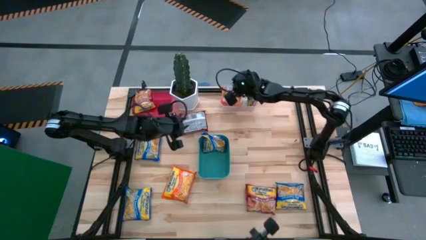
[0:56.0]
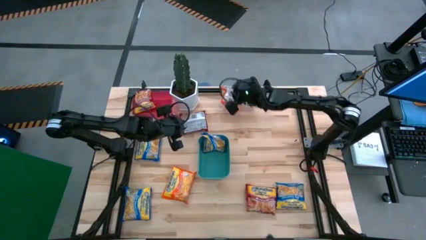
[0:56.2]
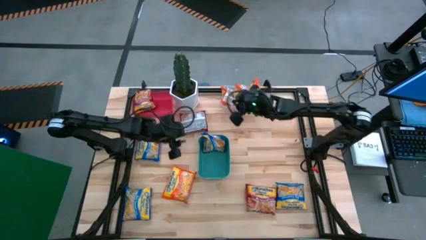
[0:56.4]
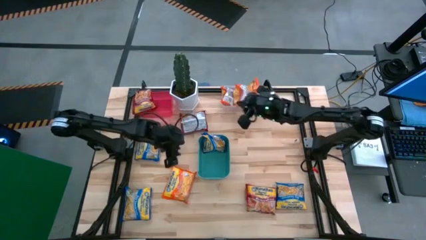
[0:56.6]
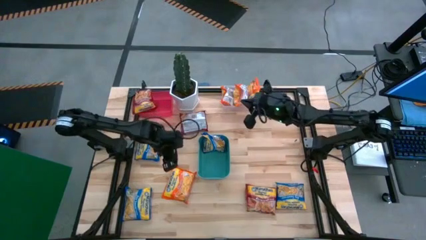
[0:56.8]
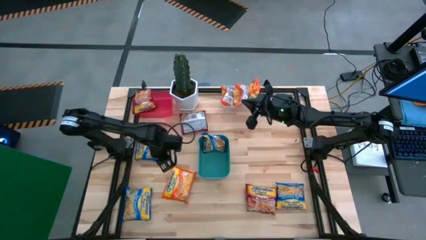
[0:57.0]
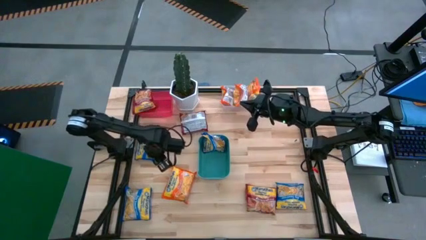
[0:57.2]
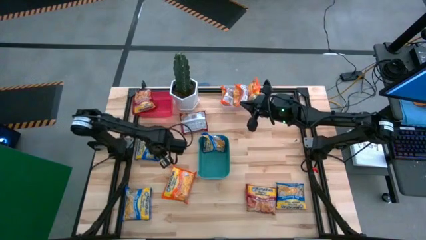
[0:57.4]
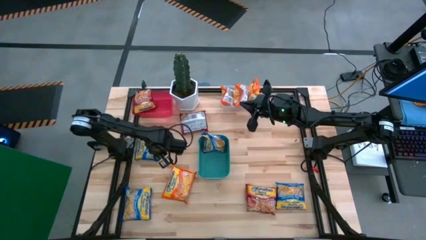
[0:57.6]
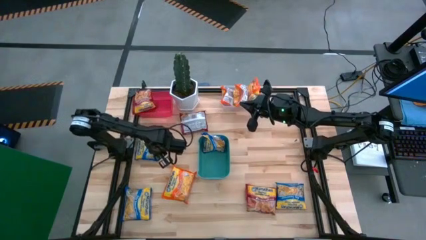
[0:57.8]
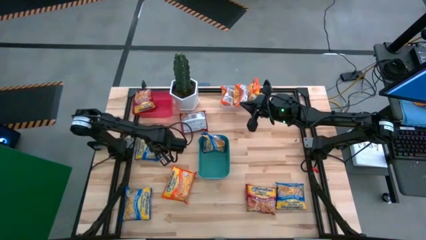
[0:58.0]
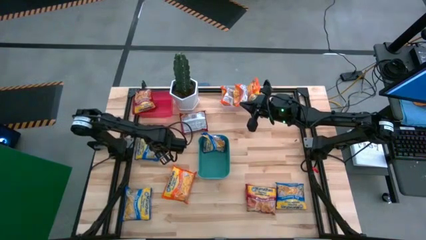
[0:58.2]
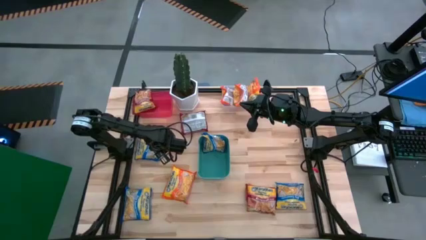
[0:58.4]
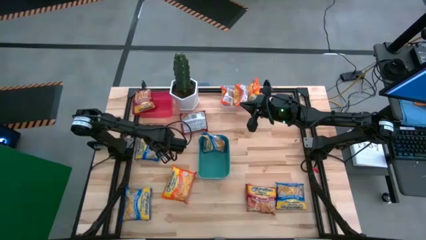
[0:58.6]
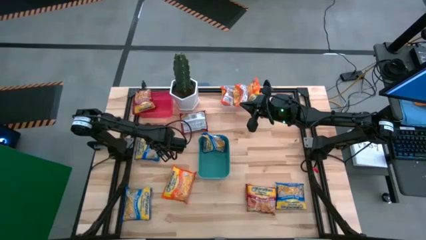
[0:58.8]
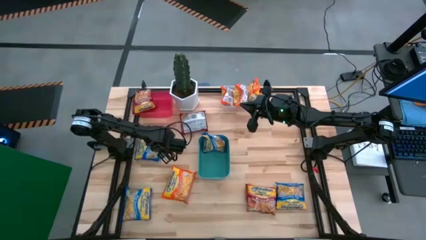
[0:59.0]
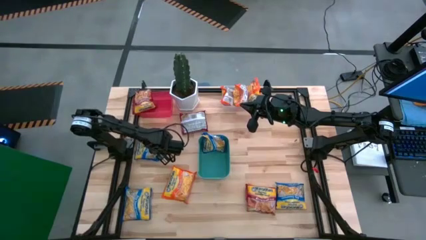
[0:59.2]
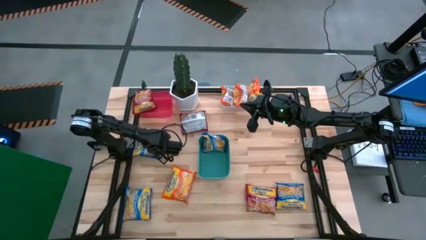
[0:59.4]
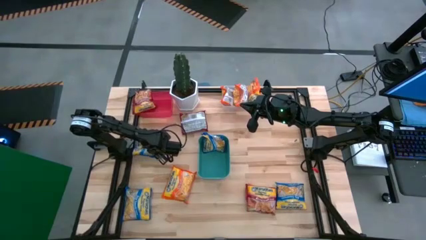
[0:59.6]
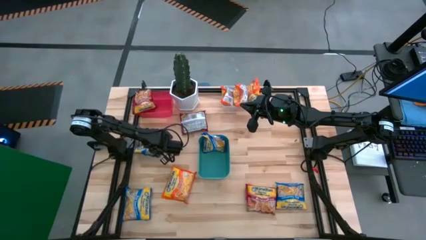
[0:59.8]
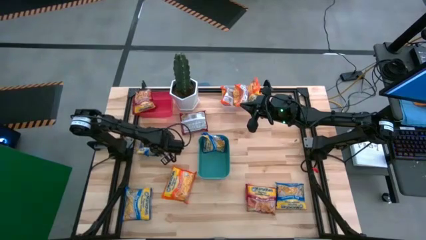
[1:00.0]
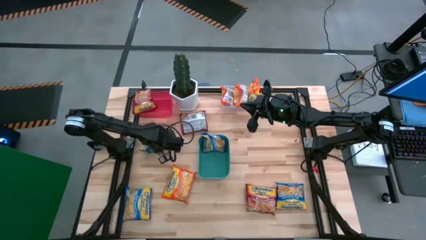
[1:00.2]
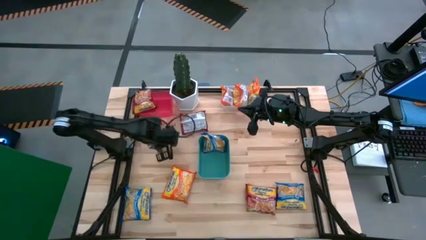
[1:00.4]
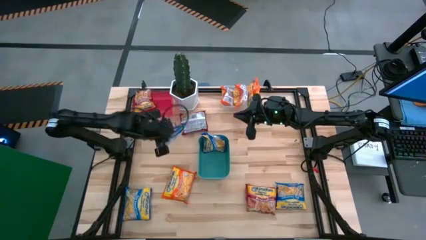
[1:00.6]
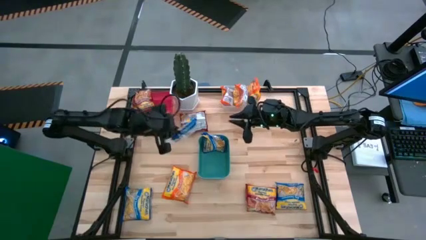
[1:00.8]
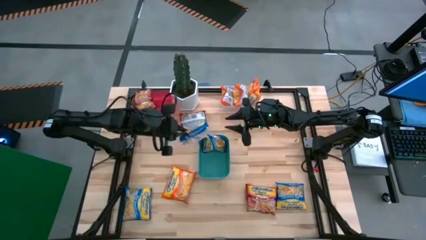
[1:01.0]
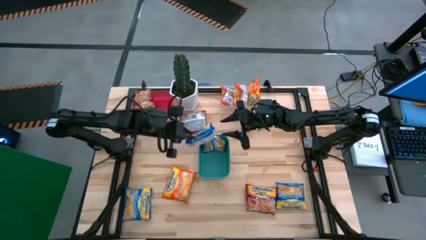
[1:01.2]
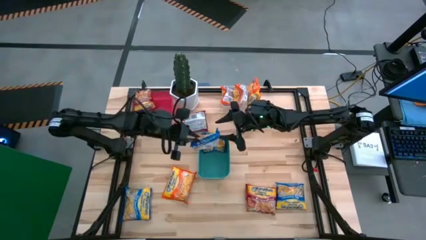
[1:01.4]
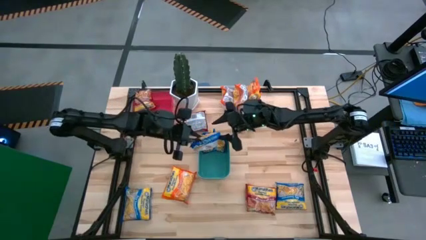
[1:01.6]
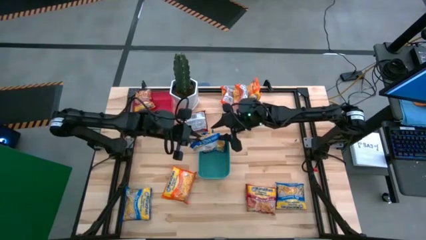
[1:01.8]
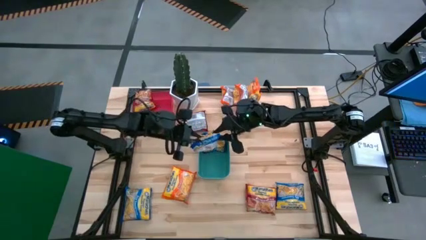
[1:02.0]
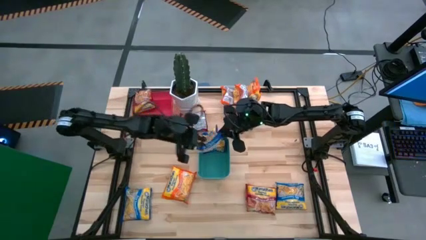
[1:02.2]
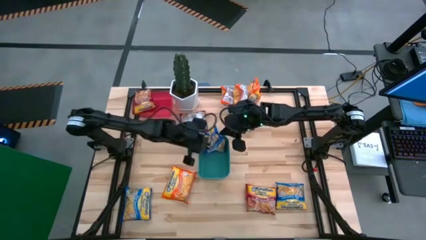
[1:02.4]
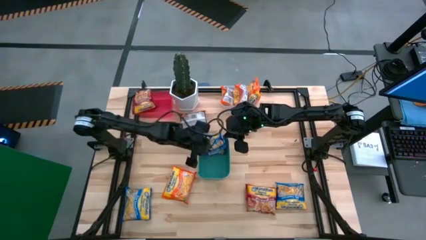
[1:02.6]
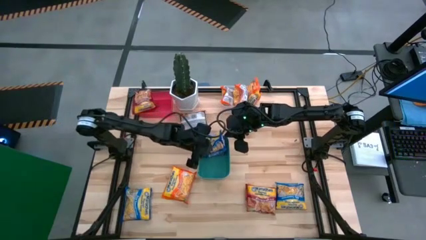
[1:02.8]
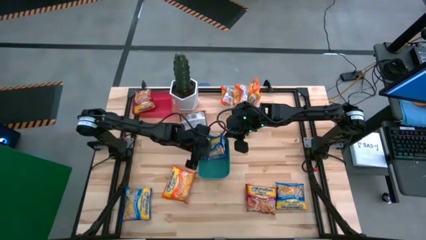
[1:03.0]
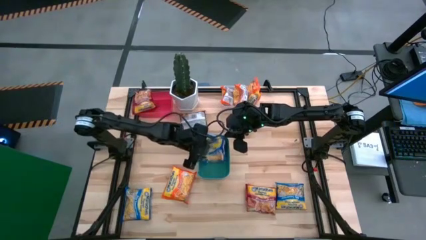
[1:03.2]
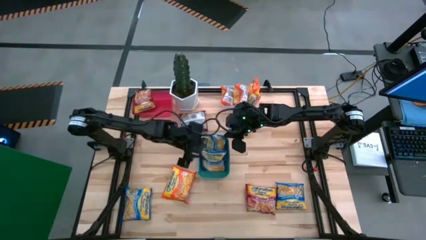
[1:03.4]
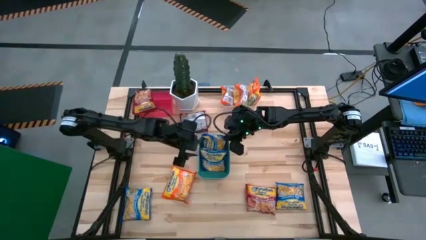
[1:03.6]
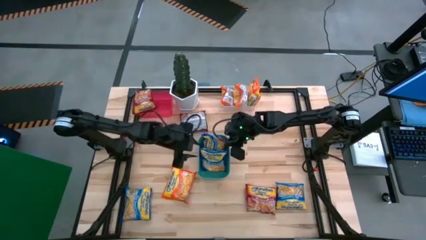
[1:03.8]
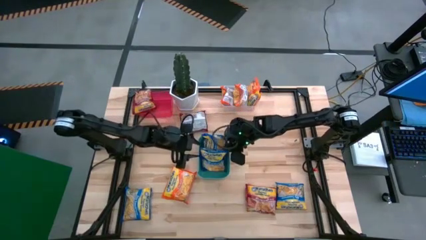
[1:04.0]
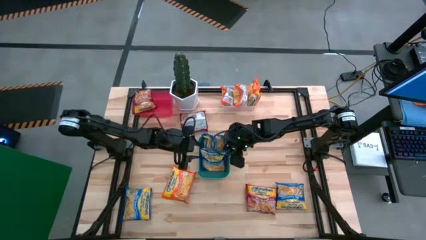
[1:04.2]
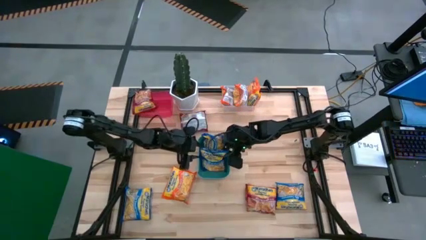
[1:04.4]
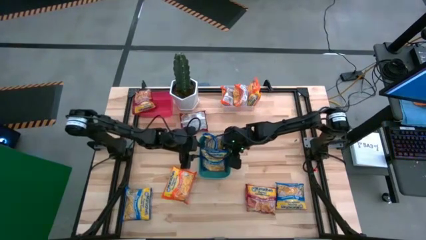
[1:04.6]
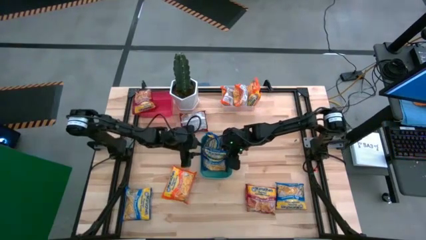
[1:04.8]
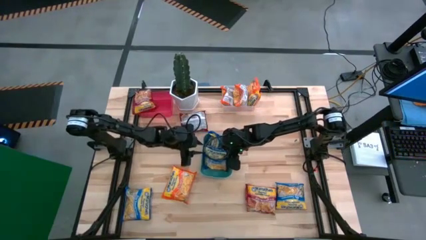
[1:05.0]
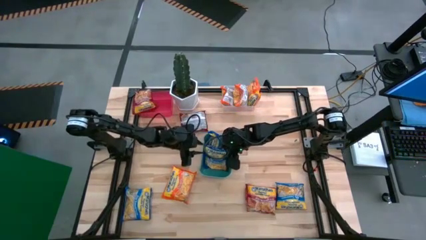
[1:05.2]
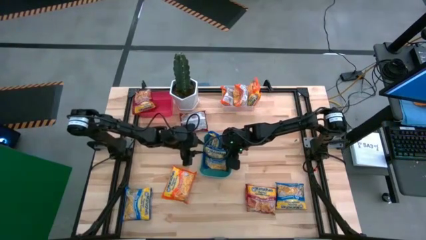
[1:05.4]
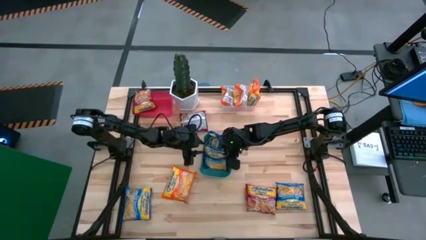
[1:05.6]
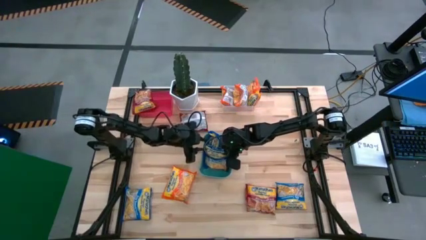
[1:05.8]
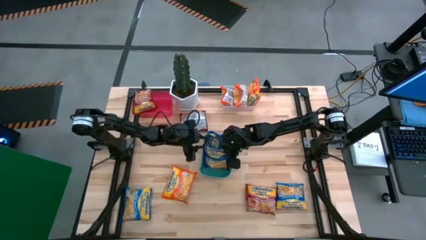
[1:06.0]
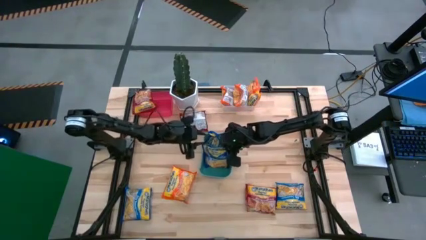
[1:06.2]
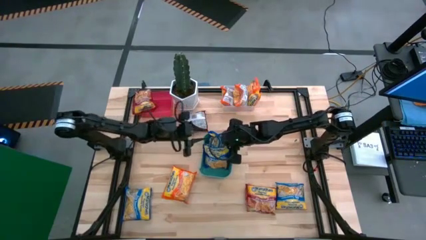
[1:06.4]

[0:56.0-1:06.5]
Task: Sort Maruchan noodles
Put the blue noodle pack into the green bin

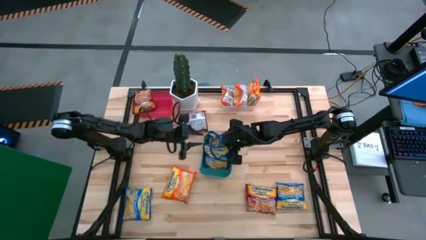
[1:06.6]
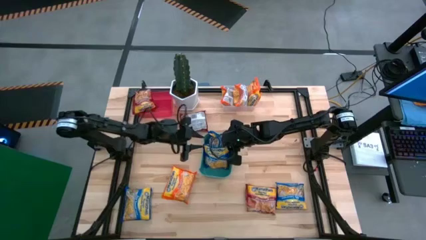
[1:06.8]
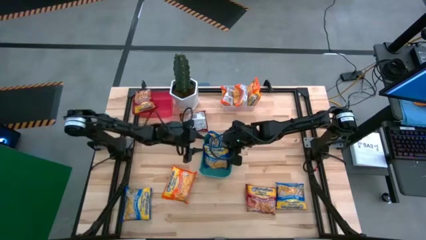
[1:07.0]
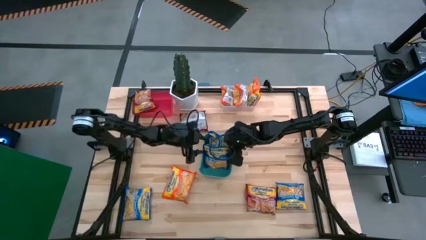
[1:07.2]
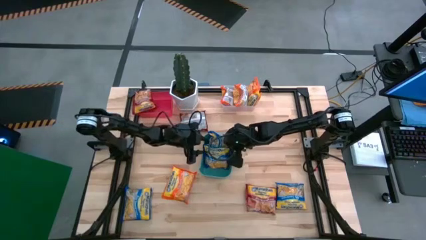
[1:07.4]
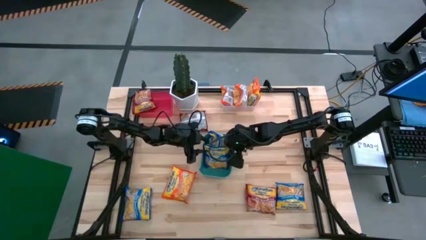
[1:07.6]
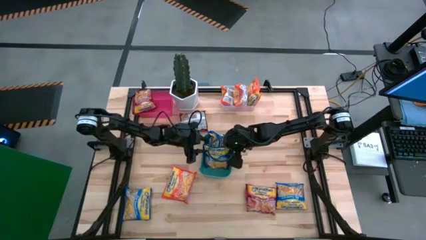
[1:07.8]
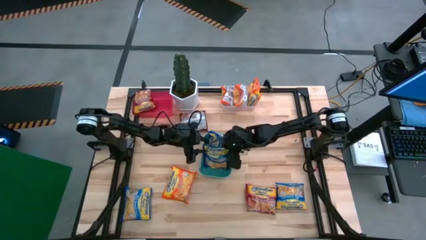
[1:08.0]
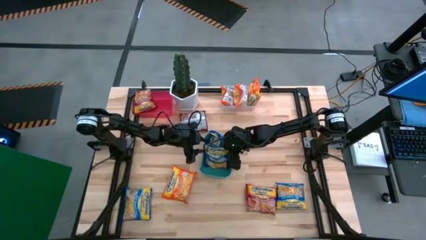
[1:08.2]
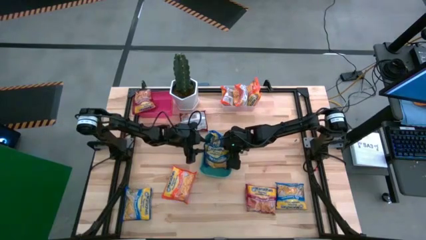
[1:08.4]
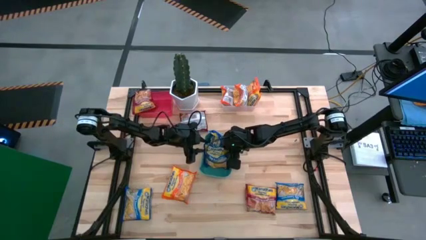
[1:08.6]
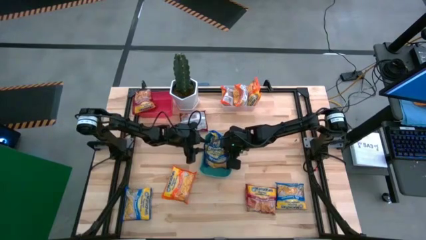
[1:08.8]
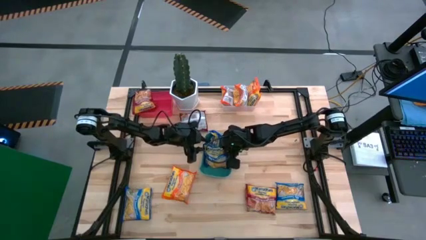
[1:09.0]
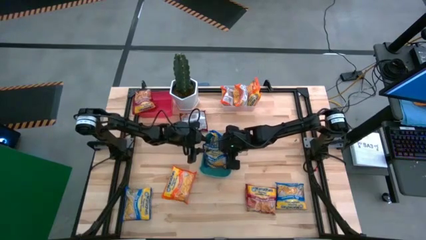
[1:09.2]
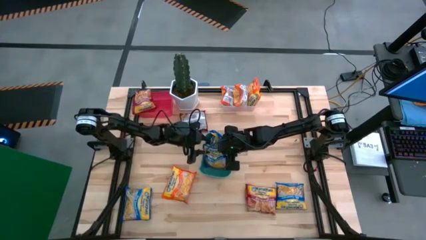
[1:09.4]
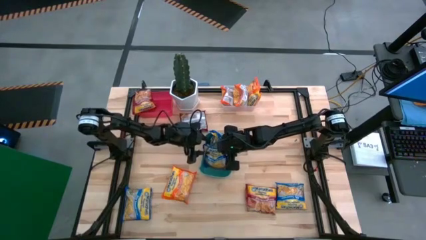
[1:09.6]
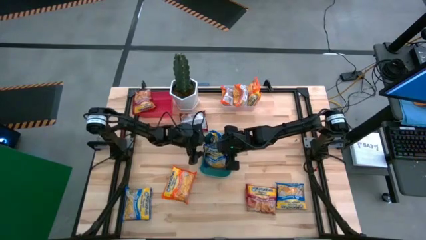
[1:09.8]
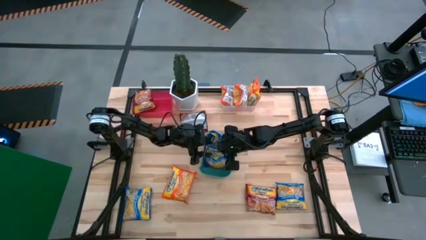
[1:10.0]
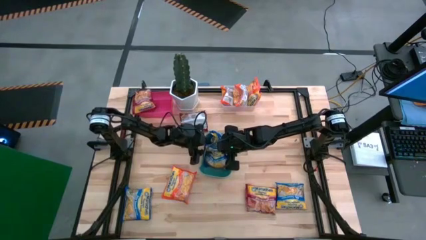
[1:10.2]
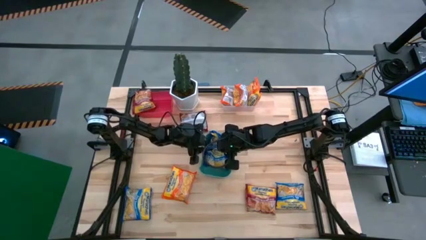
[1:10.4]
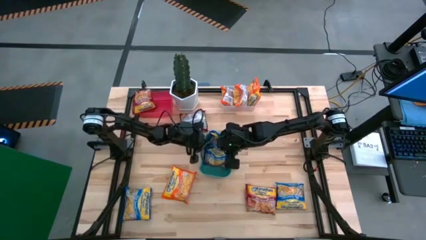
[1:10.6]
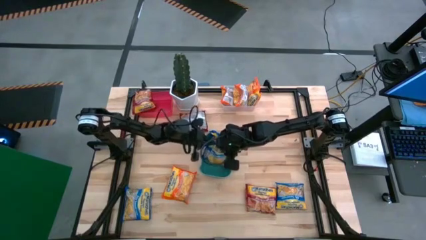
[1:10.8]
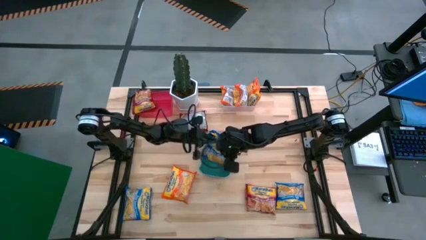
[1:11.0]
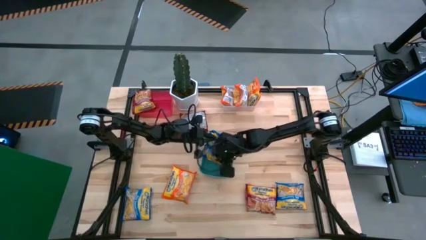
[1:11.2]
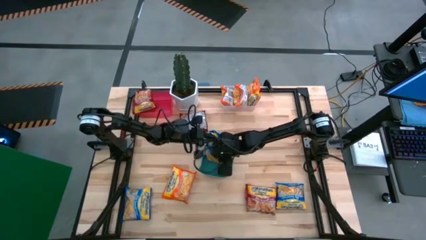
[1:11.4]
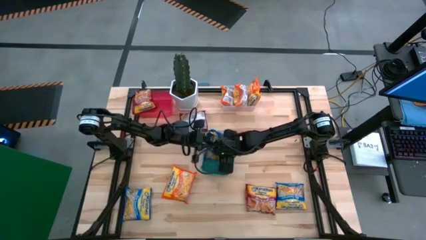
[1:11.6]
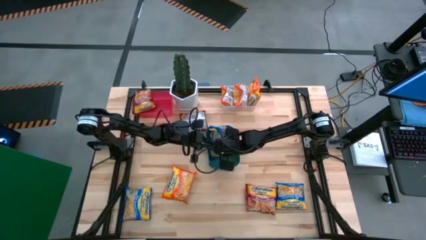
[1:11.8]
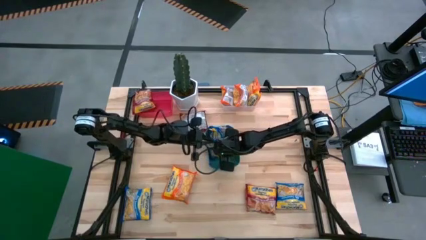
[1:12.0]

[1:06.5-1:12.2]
Put the blue noodle pack into the green bin
